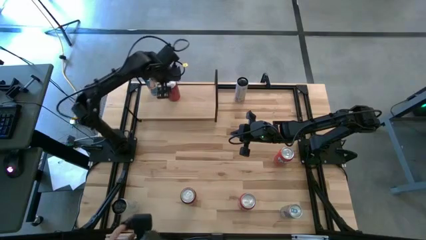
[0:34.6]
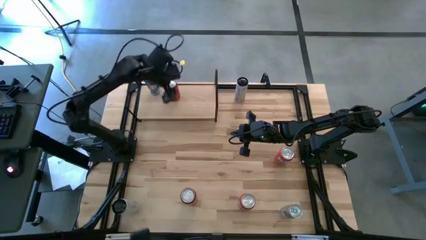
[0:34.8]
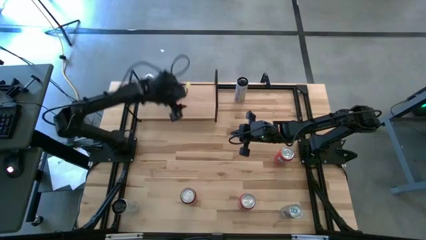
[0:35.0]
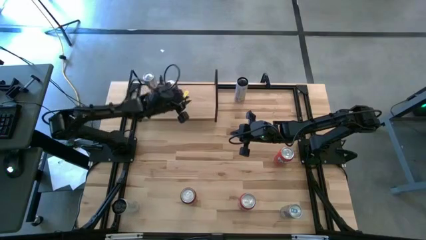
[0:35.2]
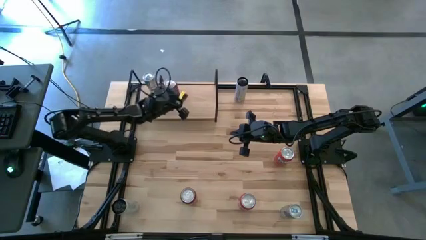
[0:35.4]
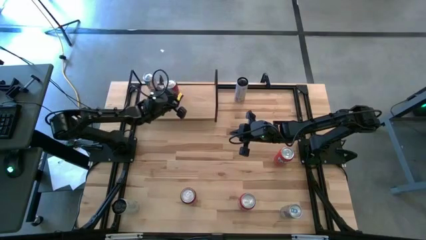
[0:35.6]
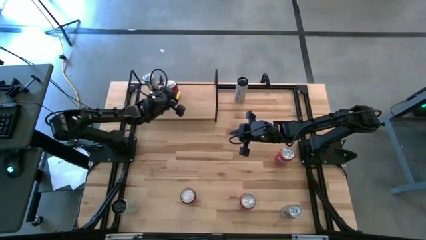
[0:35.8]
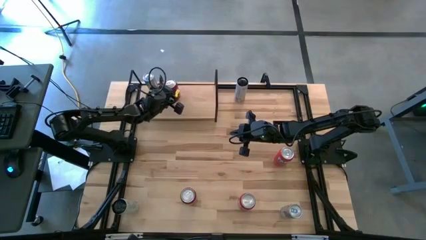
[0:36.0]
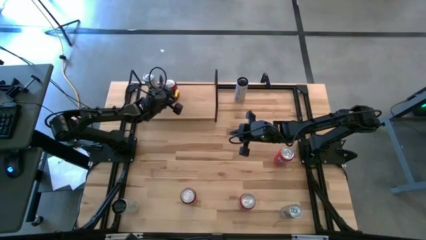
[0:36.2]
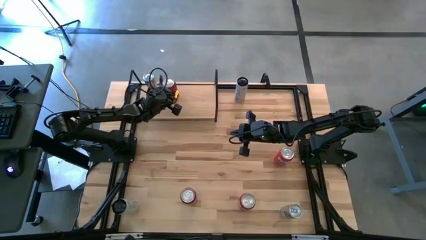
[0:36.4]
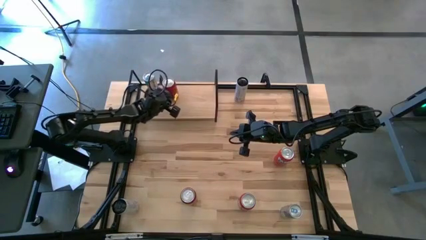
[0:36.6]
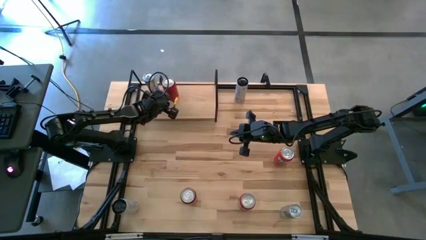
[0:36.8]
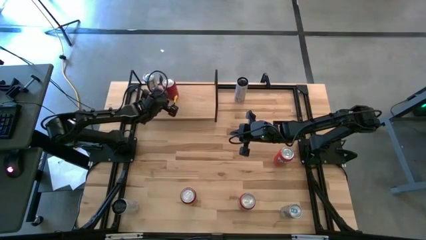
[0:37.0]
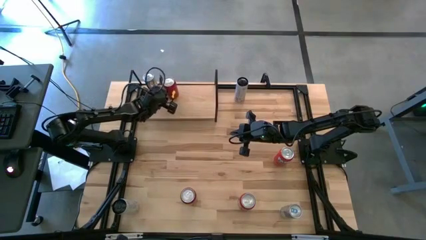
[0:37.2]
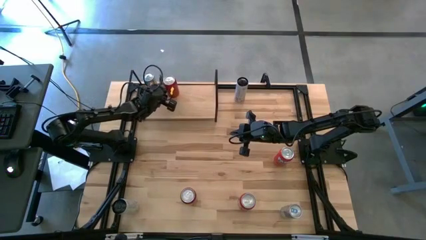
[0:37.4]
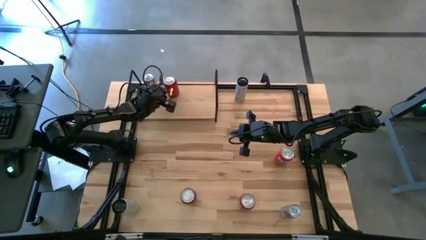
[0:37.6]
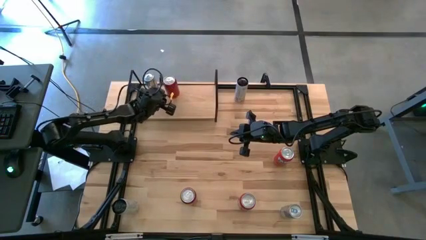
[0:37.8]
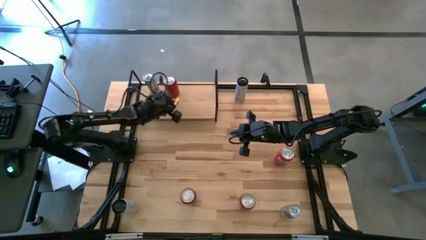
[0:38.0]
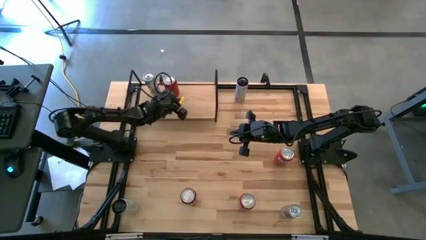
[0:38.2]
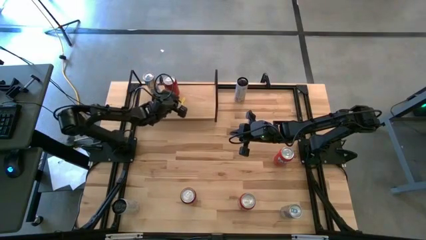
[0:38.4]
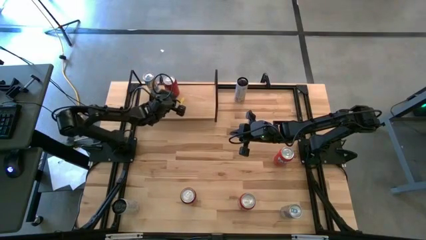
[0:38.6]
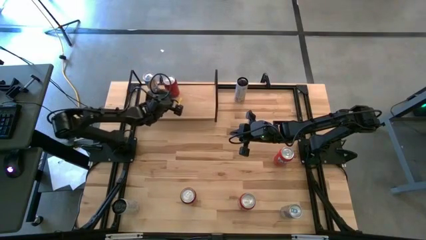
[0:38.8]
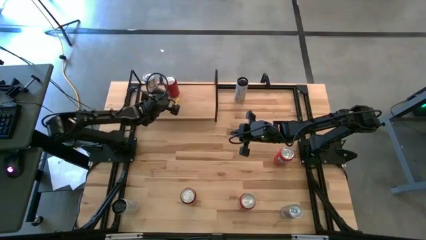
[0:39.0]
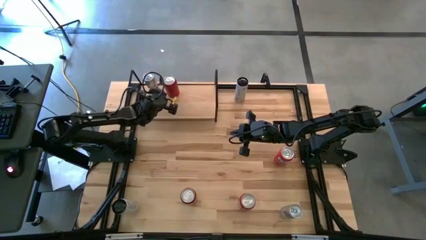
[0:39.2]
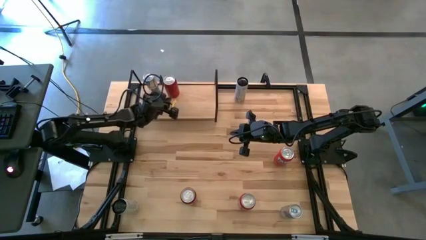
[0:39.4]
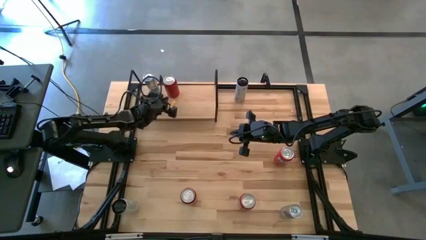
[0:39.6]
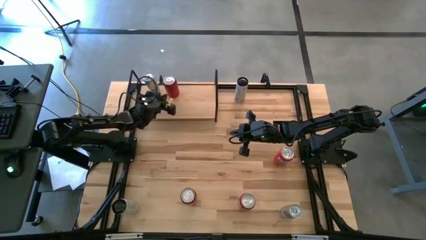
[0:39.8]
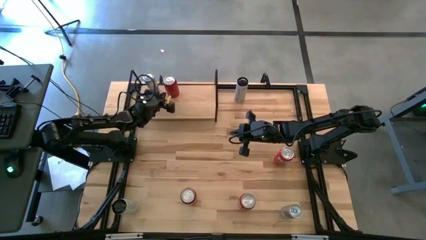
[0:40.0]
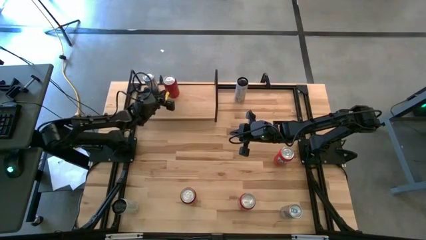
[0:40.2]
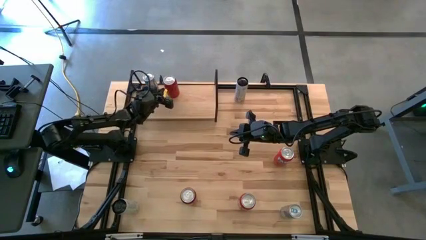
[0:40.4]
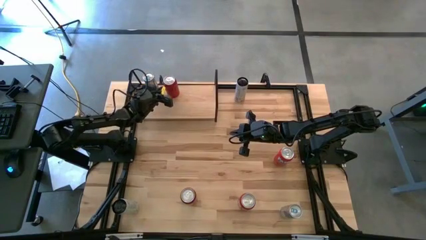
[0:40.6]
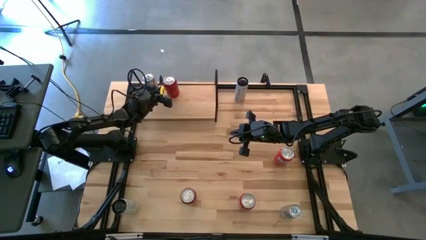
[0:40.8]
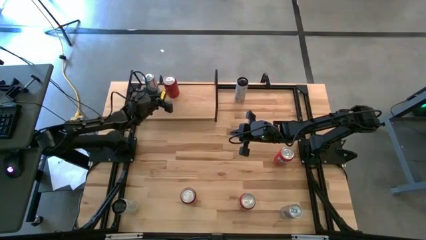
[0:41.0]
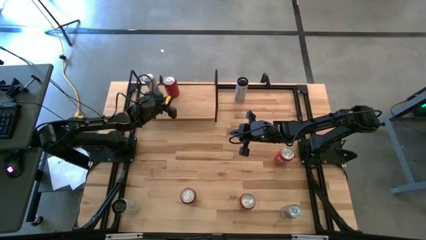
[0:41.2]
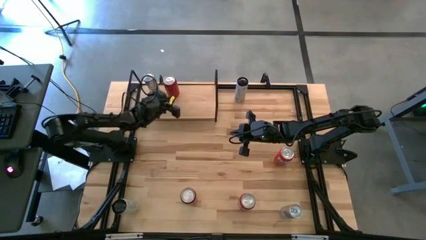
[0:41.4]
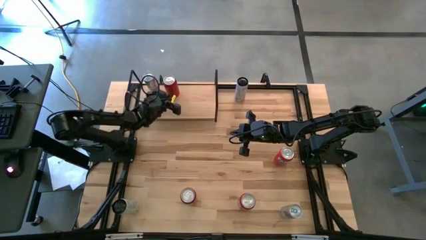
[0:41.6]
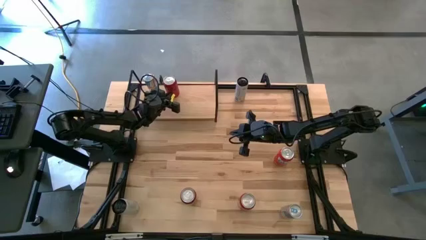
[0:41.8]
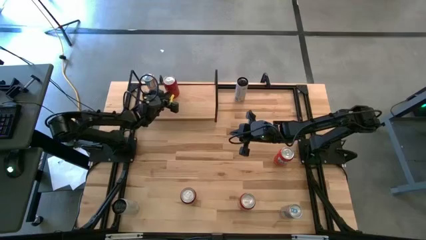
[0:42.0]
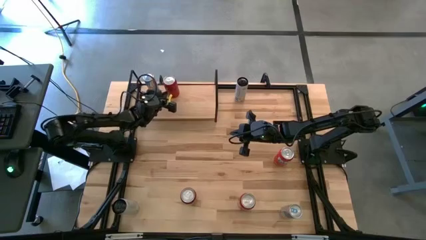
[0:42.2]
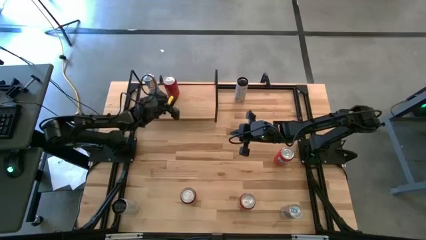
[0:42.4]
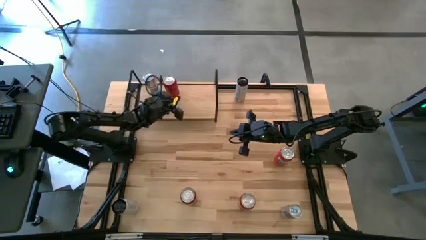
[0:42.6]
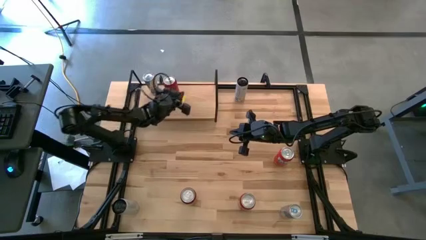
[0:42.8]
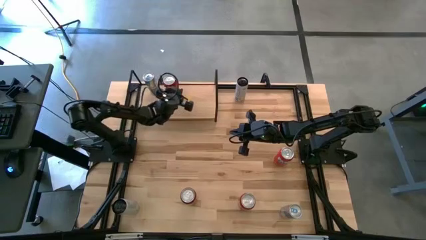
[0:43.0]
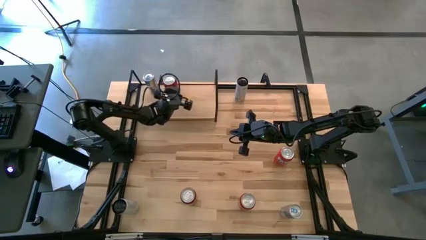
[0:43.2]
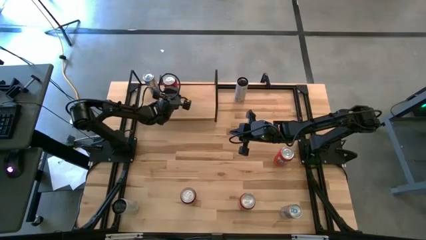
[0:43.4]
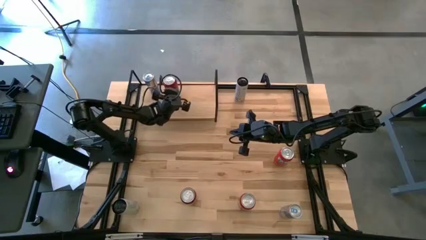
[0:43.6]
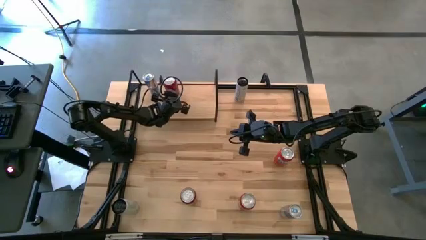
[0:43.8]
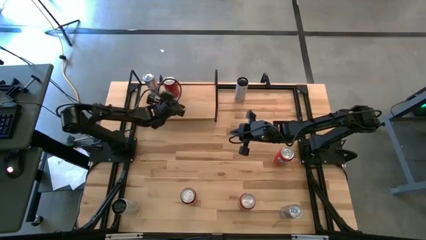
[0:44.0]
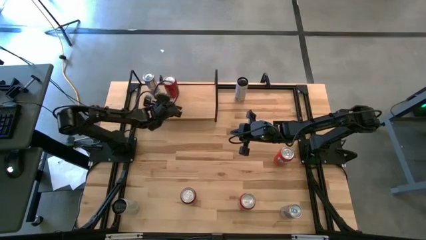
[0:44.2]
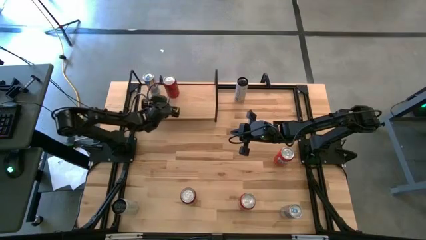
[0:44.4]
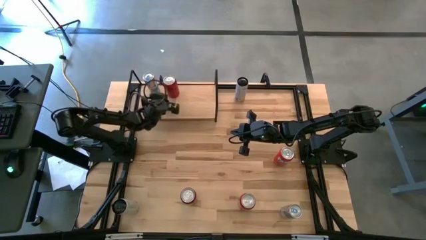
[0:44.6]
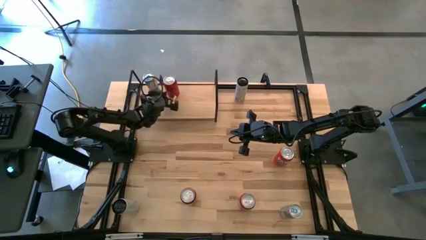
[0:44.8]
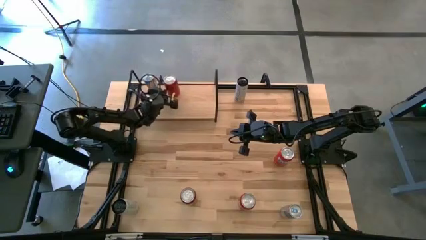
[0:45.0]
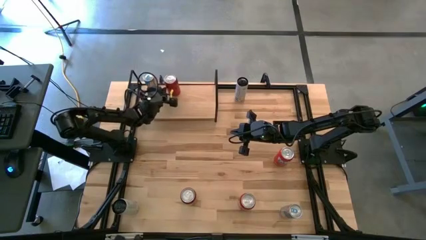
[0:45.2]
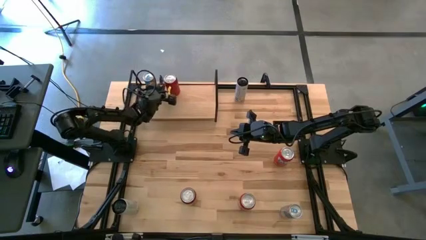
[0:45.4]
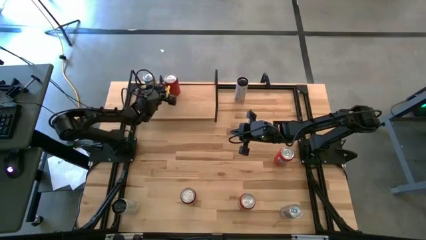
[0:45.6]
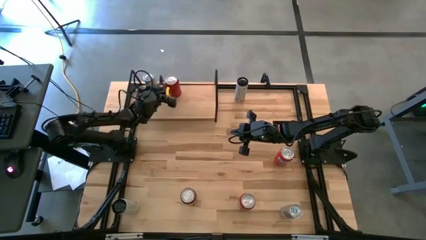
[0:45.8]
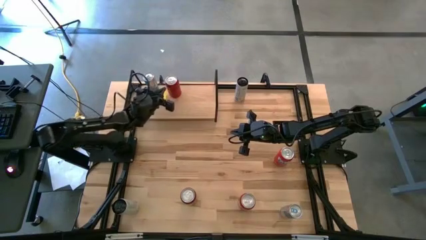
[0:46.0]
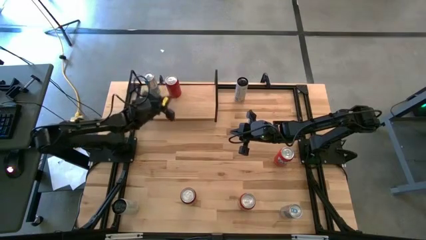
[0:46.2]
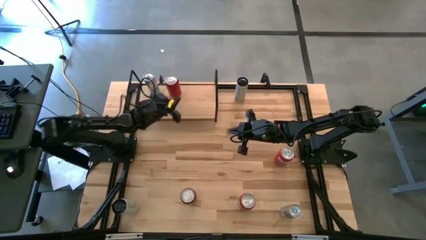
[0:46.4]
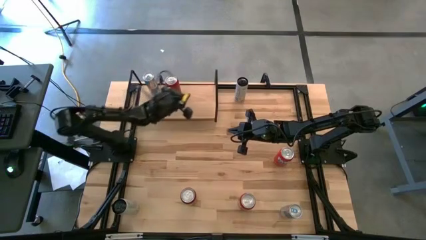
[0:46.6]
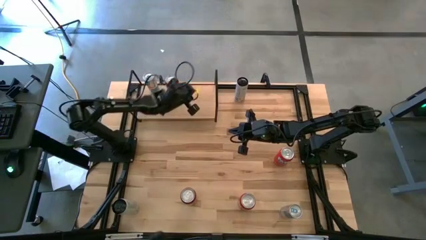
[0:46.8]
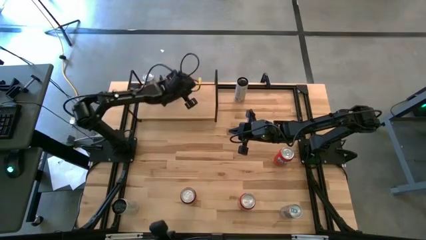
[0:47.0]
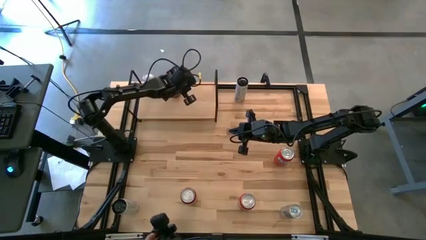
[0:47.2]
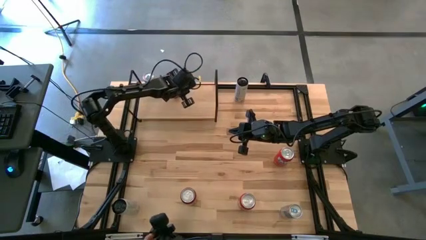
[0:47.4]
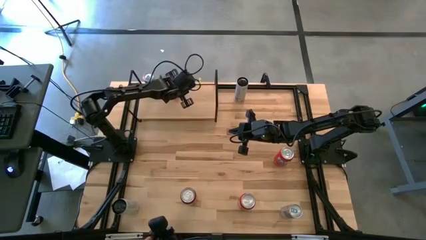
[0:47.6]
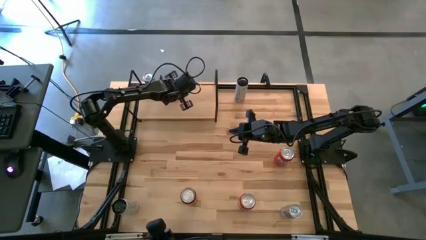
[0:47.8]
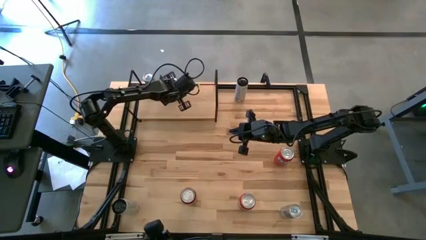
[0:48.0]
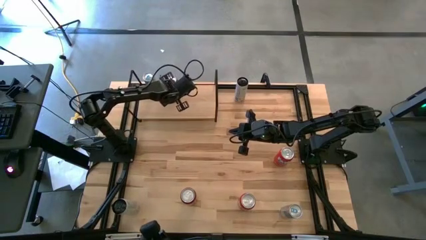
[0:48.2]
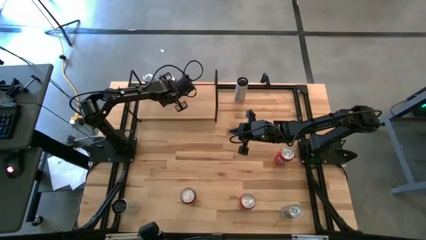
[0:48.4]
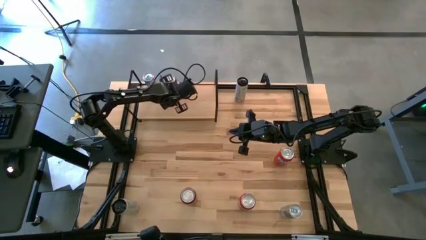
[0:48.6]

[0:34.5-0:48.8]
Task: Place canned beverage on shelf
Put the top red black soda can on the shelf
